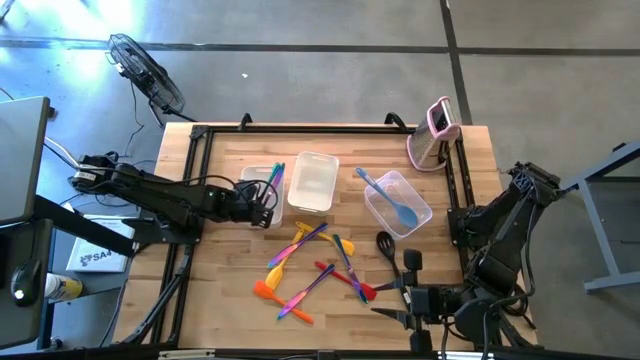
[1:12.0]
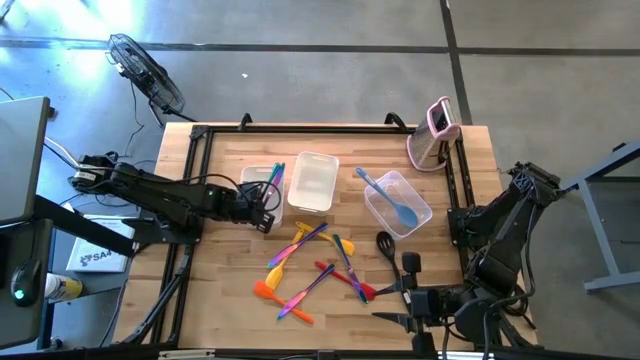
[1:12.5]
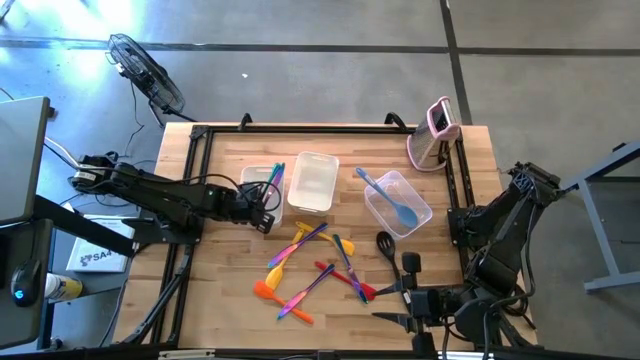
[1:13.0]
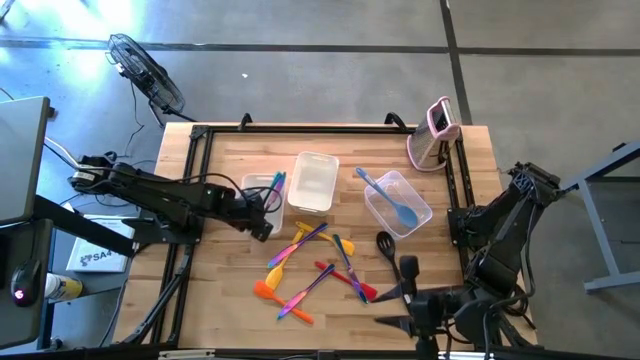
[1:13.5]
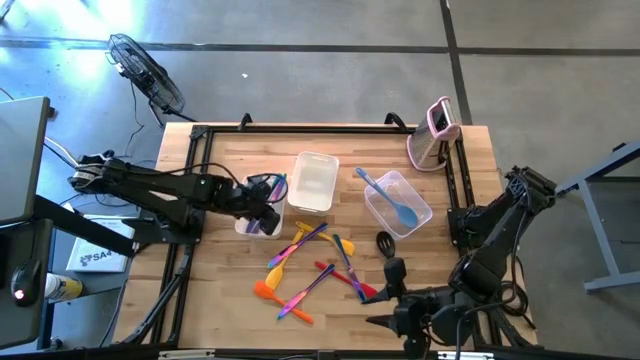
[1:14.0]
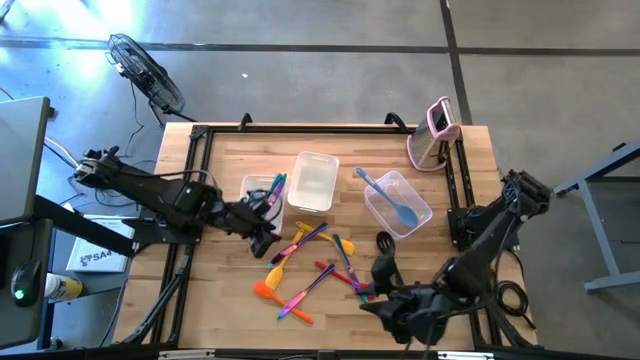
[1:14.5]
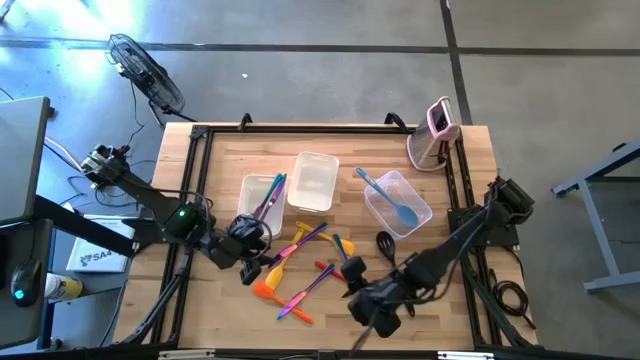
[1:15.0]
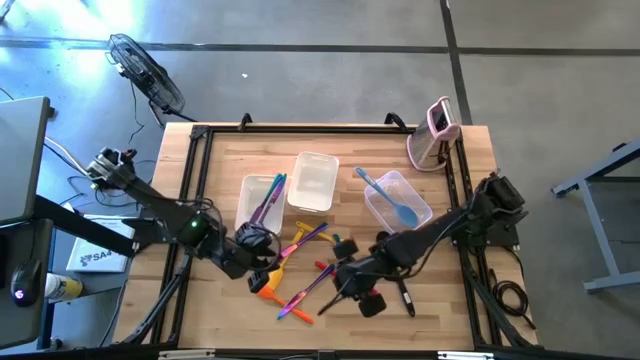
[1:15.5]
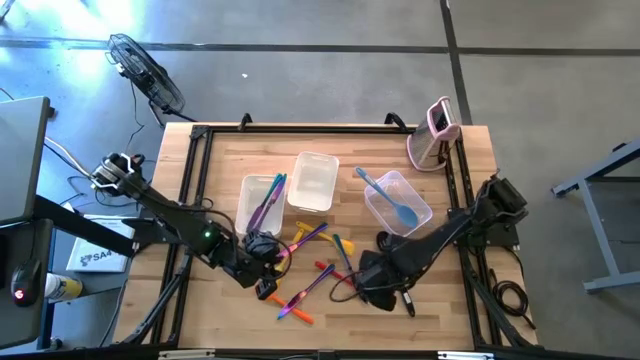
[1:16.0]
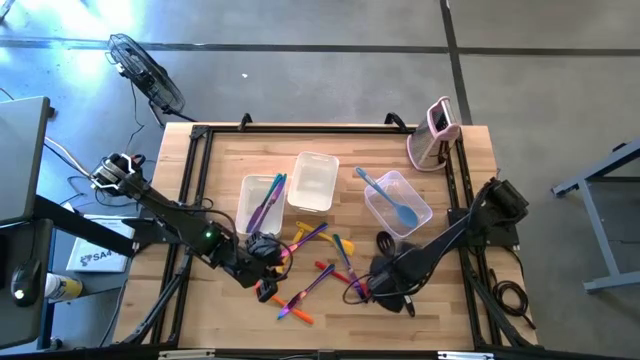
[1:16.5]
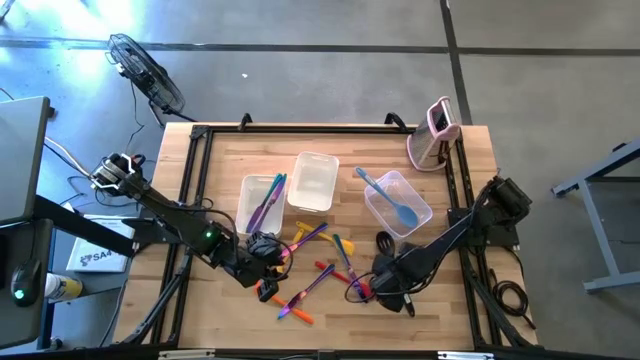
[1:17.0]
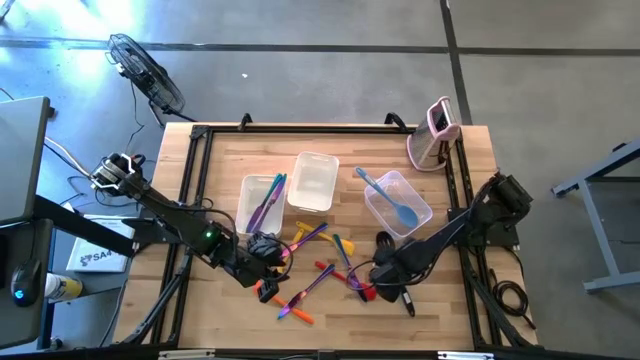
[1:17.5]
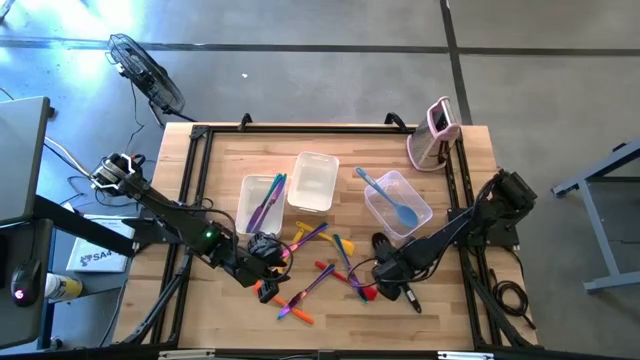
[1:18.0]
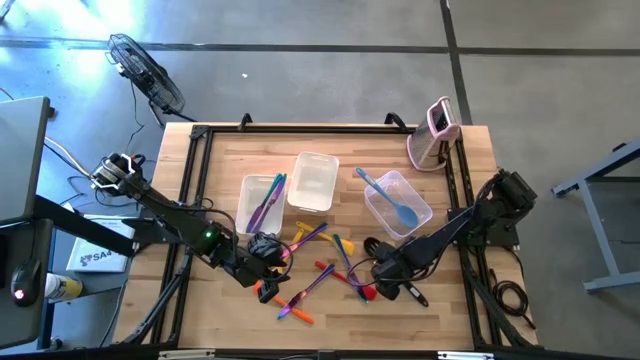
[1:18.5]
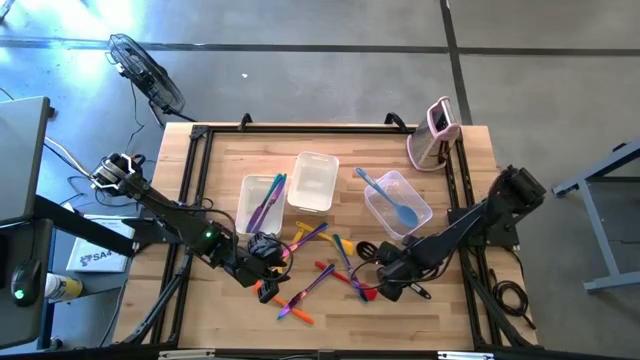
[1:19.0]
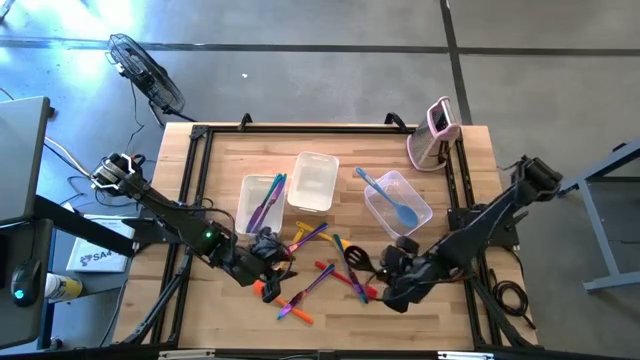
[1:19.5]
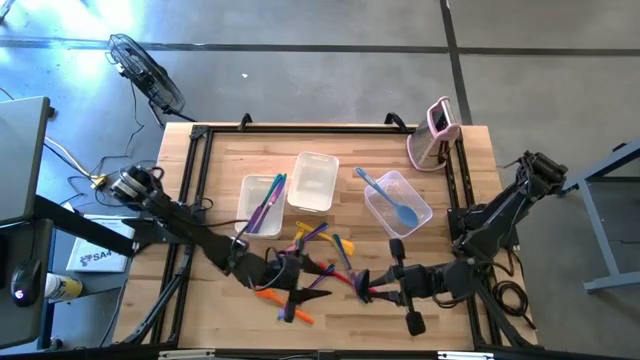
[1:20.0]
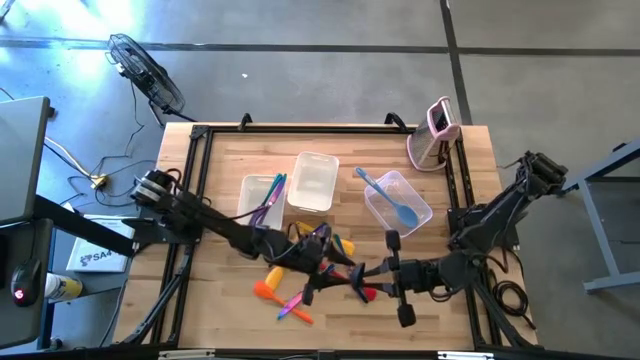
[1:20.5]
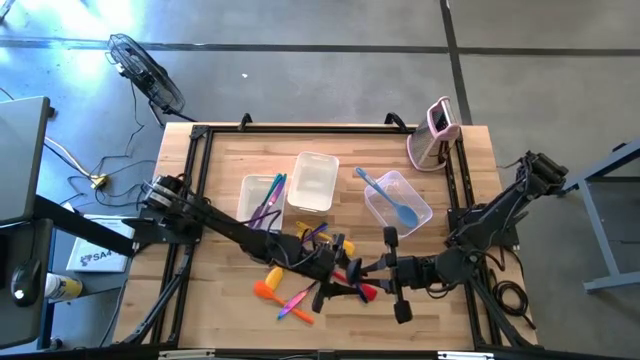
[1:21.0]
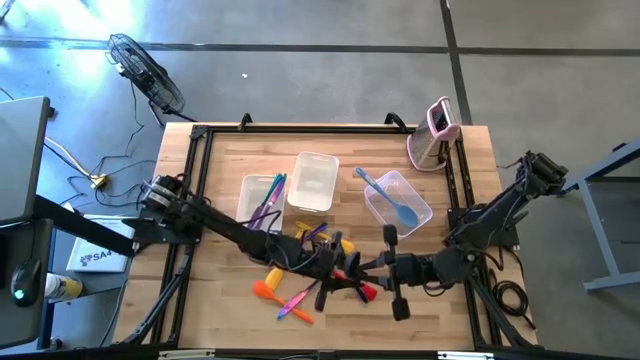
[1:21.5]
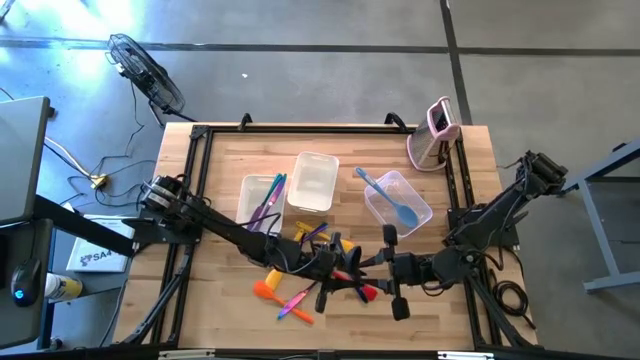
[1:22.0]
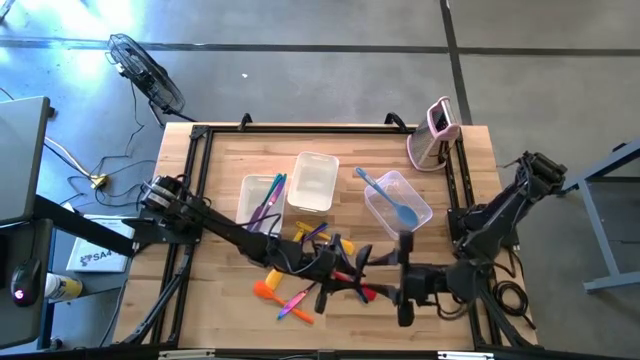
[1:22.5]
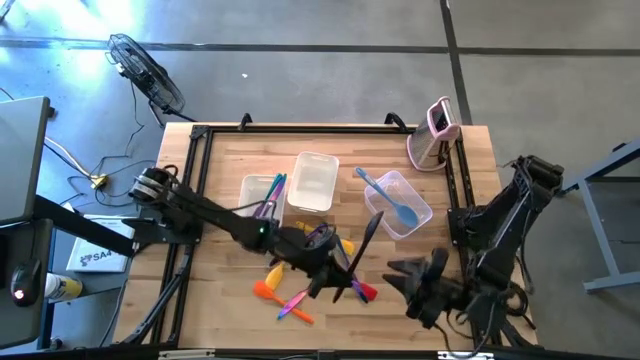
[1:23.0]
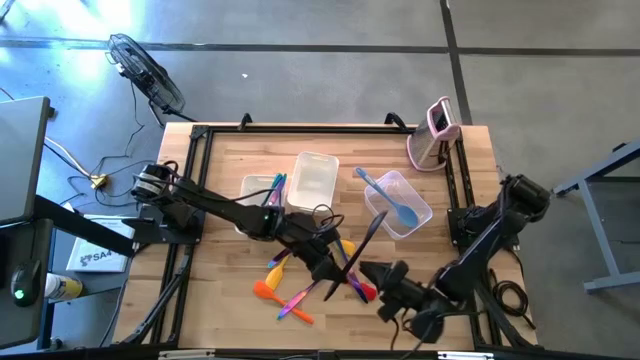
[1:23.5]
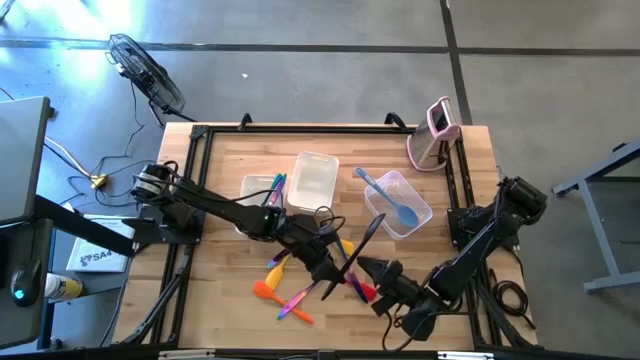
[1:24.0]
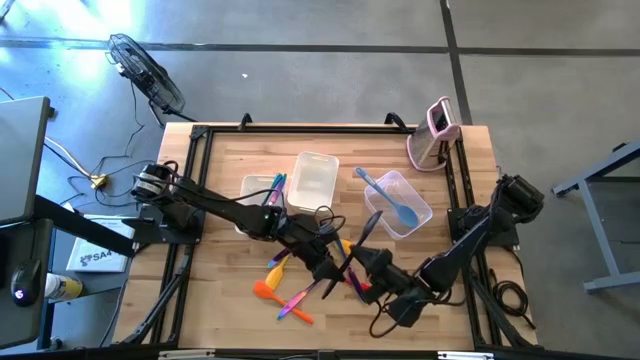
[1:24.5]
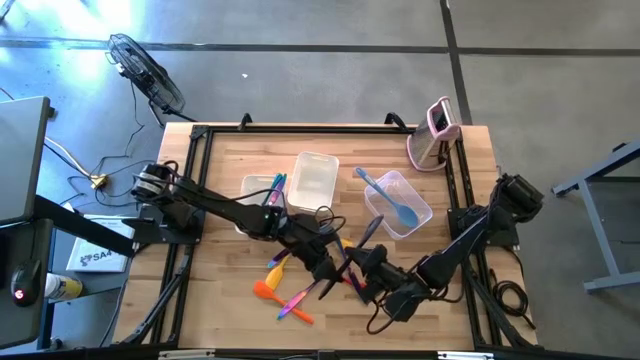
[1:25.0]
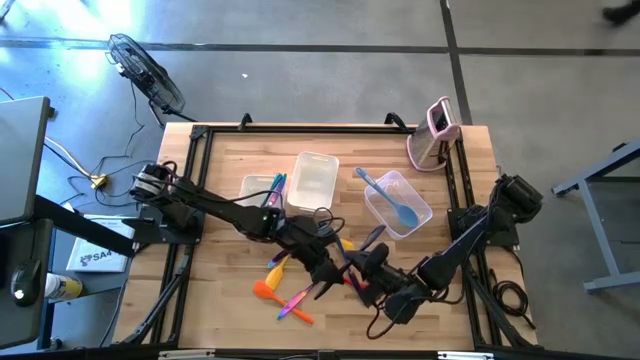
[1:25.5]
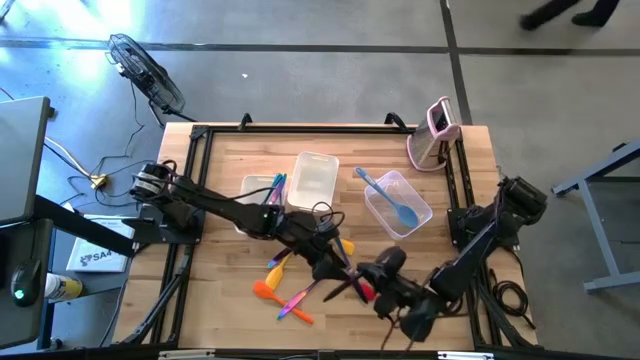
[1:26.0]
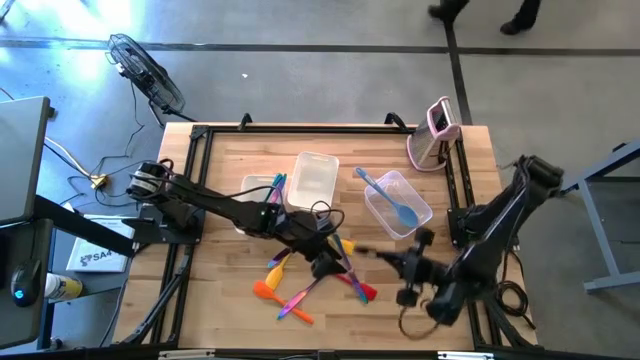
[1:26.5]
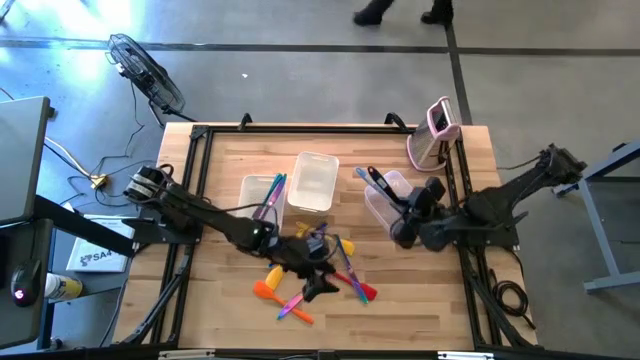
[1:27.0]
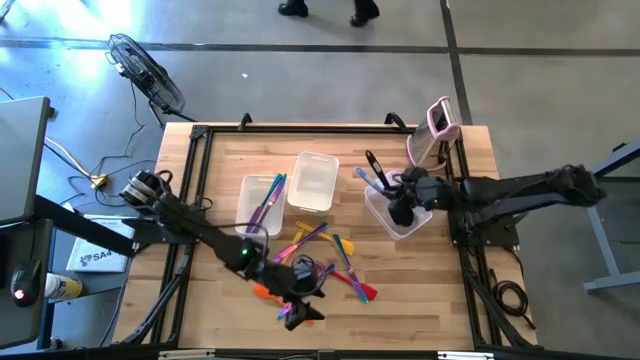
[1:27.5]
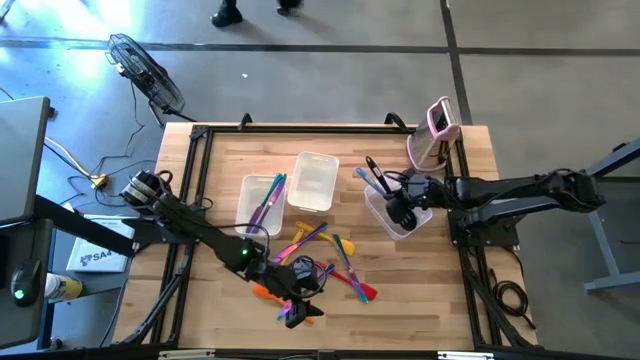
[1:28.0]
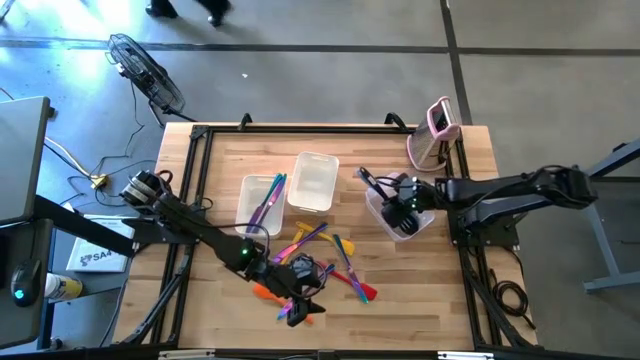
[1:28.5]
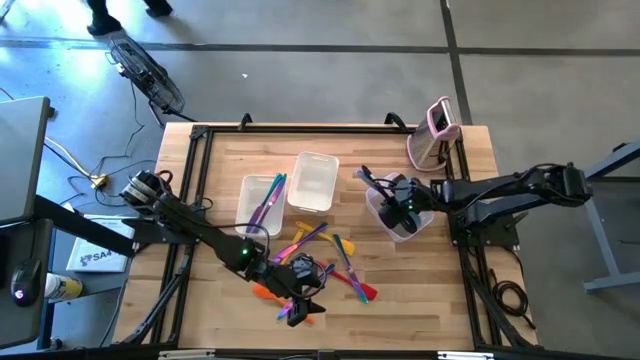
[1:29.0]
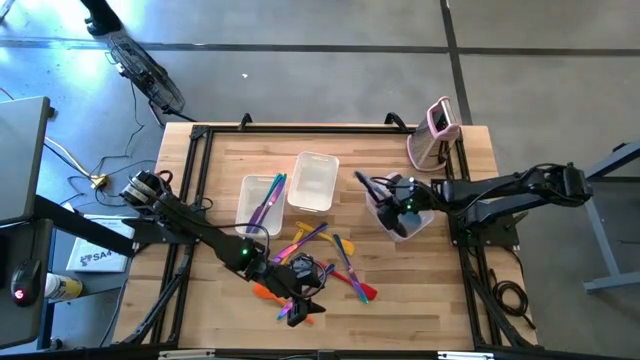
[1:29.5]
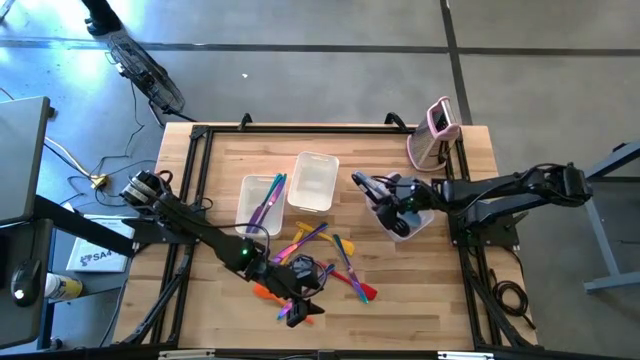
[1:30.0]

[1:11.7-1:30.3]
Task: Pick & Place Kitchen Items
Put the black serving spoon into the transparent bin

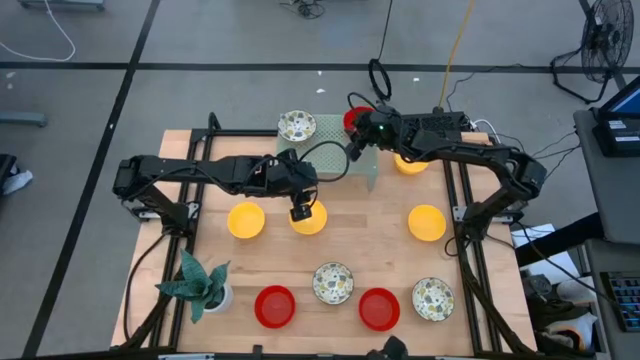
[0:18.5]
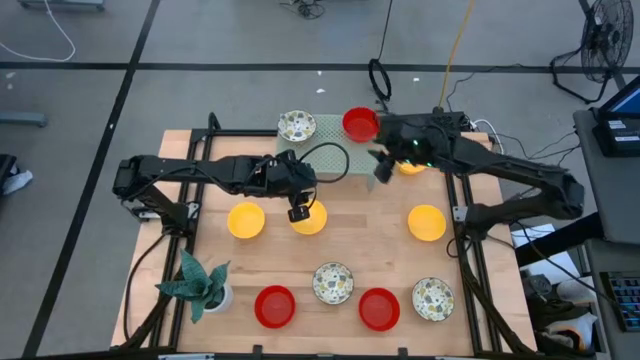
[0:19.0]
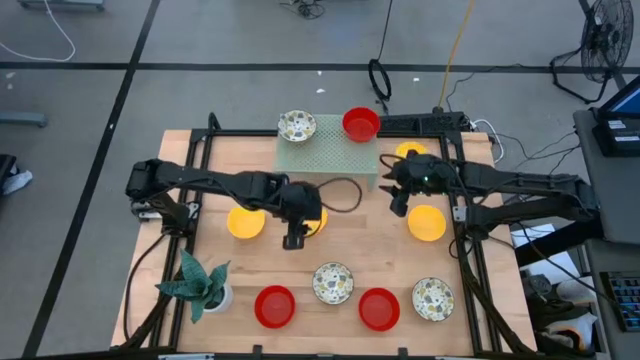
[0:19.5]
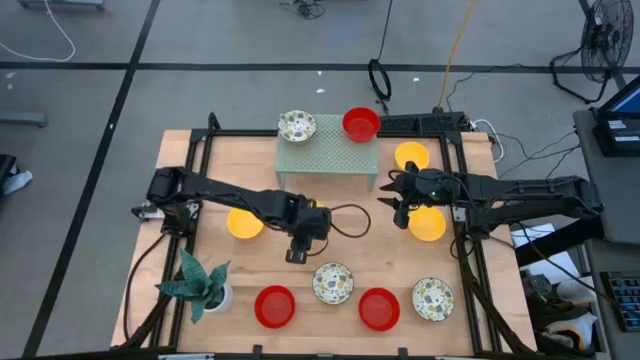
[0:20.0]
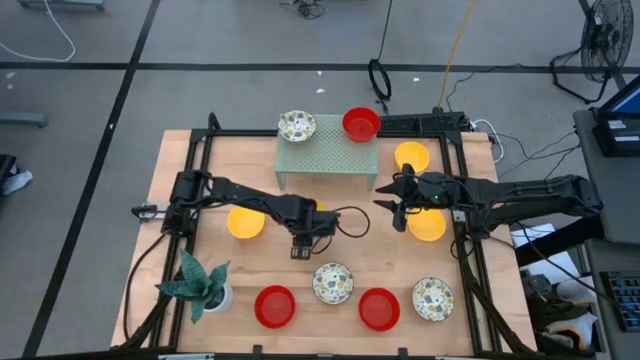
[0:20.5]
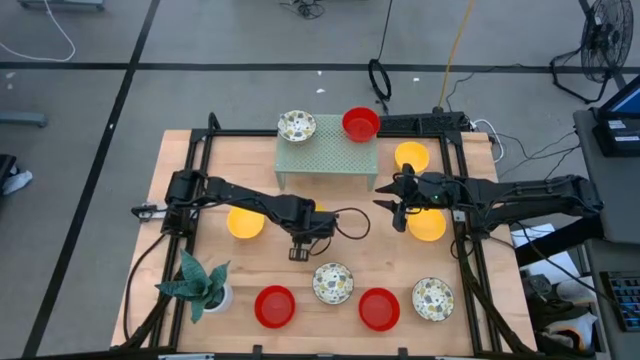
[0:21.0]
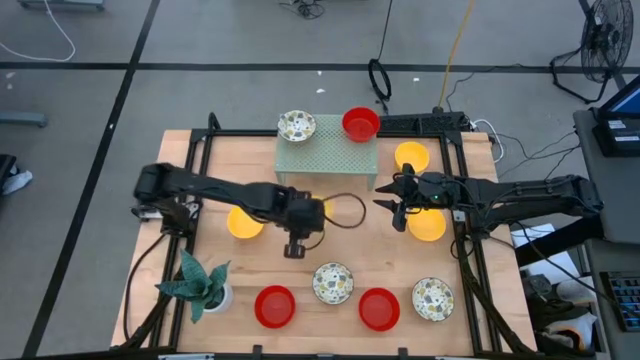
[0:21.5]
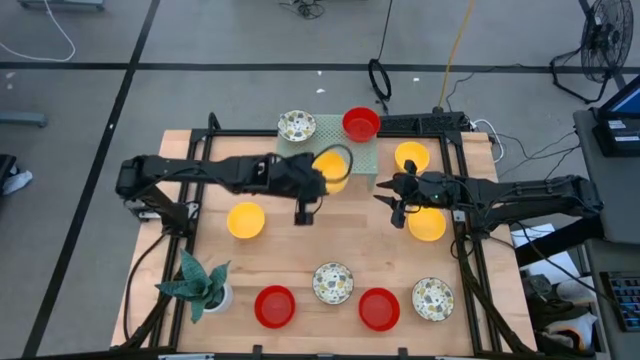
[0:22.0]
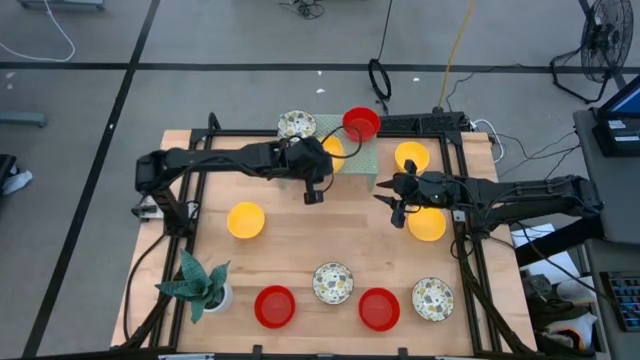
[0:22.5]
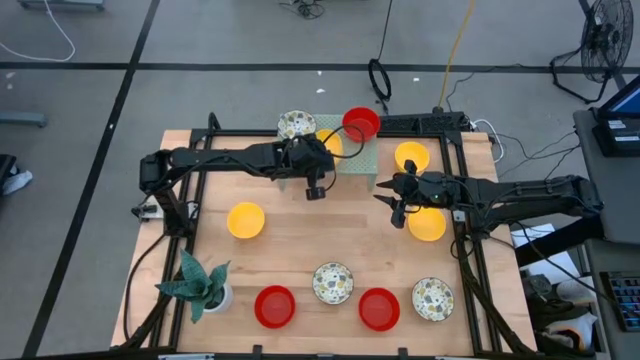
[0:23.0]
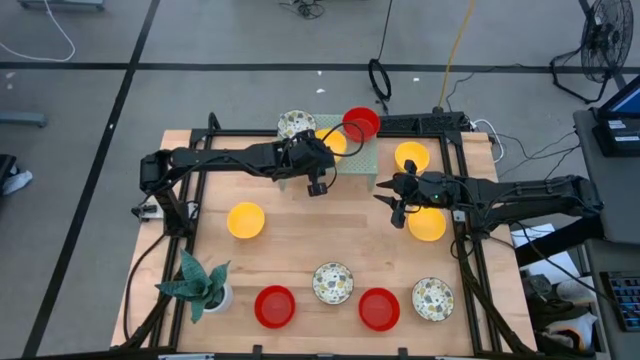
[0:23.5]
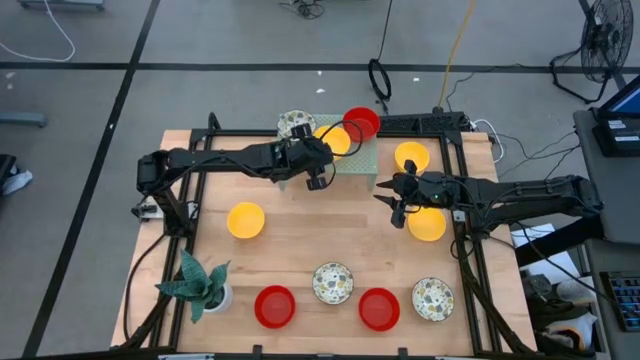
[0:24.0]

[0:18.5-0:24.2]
Task: Pick & Place Mini bowls
Put the yellow bowl on the shelf
